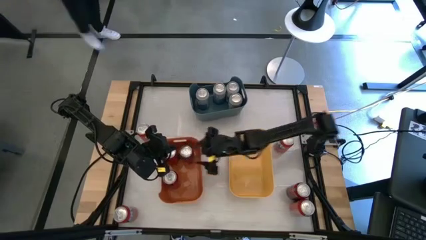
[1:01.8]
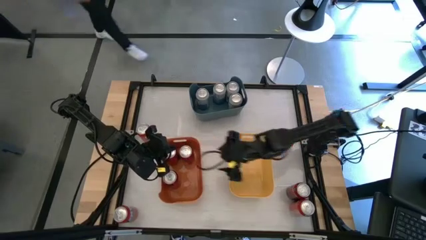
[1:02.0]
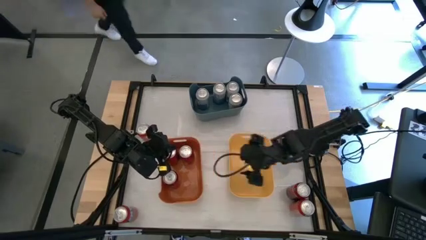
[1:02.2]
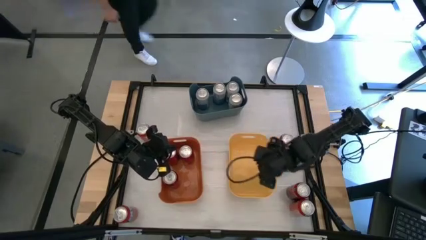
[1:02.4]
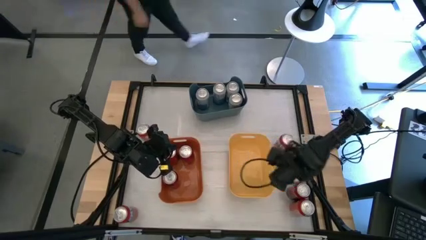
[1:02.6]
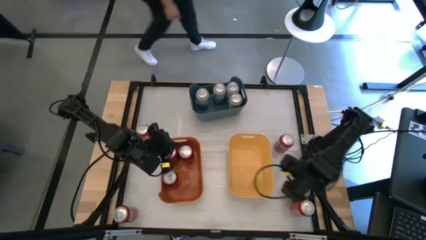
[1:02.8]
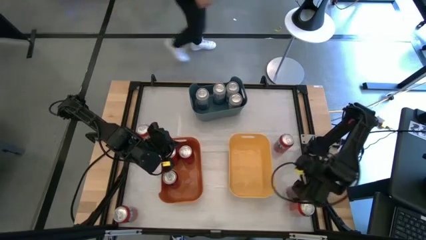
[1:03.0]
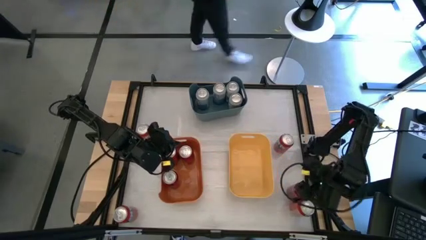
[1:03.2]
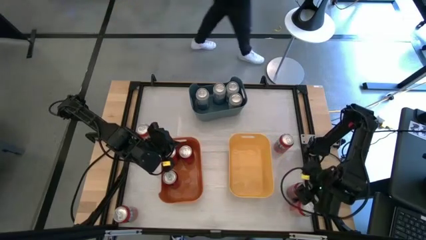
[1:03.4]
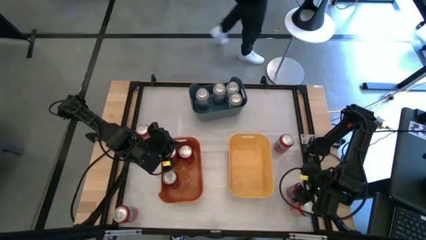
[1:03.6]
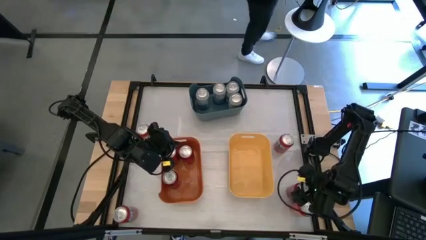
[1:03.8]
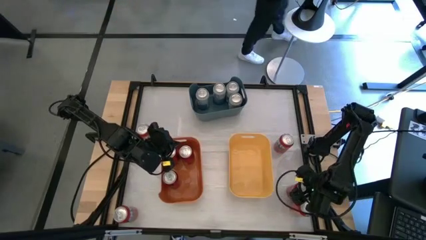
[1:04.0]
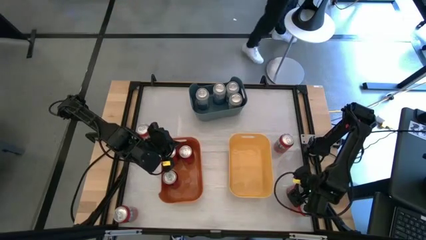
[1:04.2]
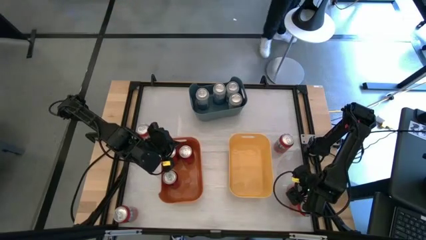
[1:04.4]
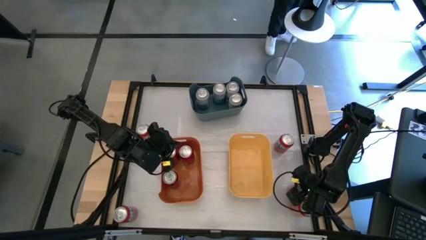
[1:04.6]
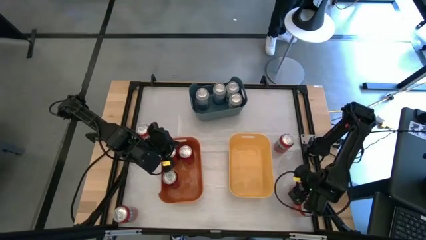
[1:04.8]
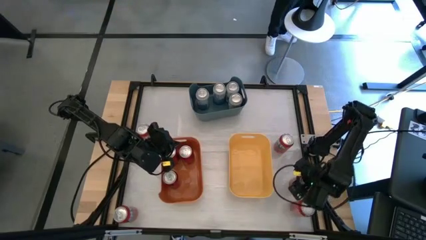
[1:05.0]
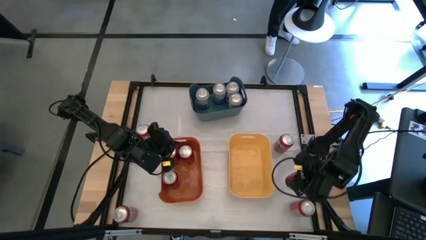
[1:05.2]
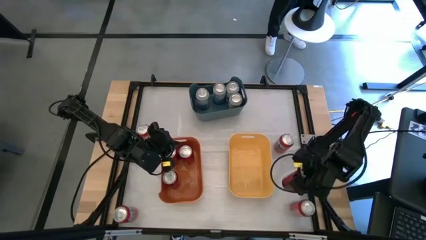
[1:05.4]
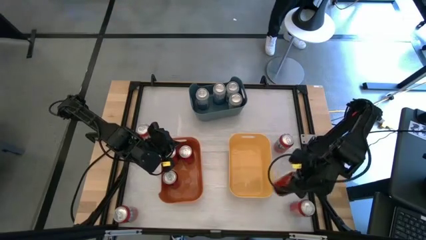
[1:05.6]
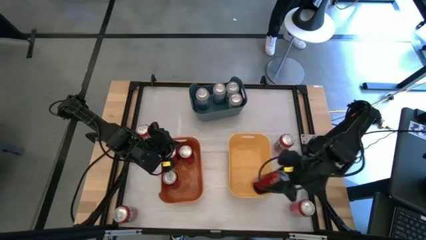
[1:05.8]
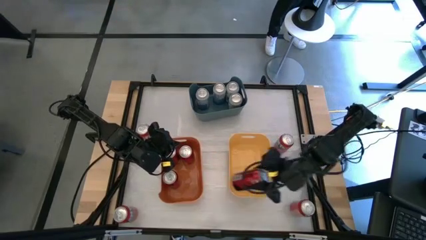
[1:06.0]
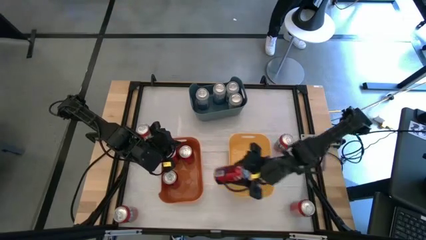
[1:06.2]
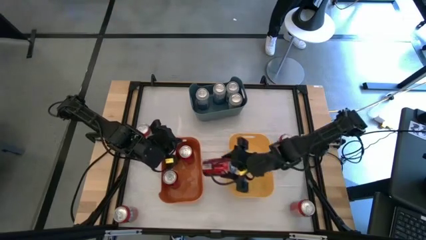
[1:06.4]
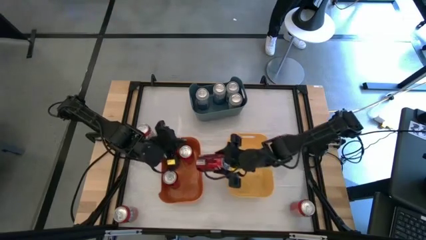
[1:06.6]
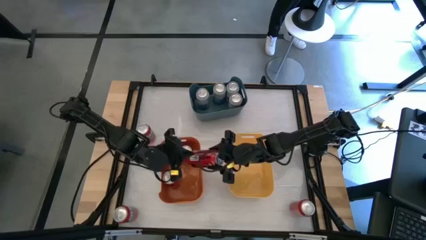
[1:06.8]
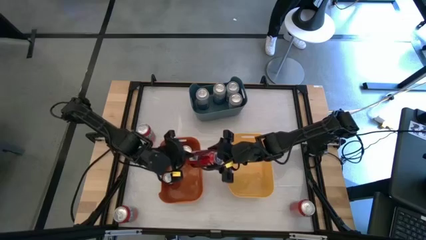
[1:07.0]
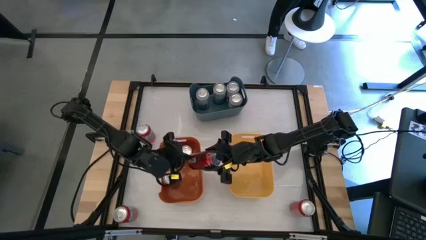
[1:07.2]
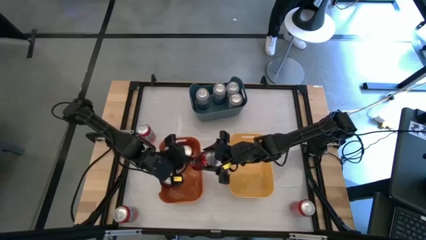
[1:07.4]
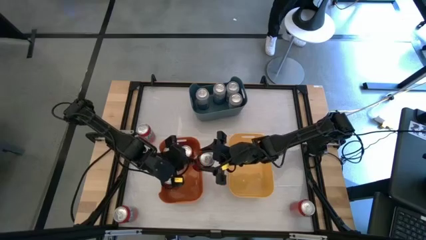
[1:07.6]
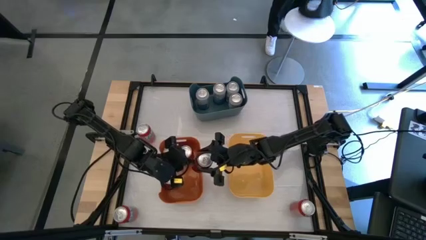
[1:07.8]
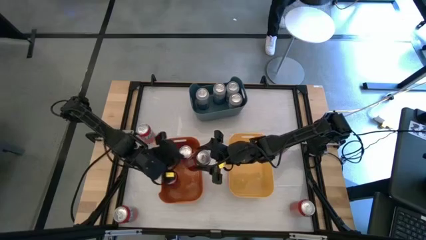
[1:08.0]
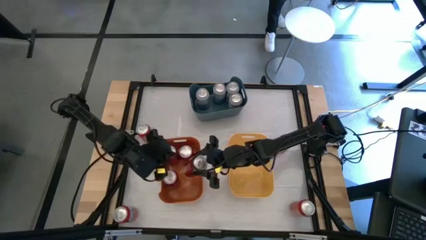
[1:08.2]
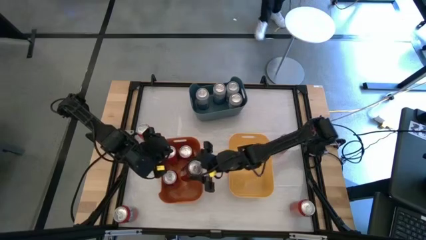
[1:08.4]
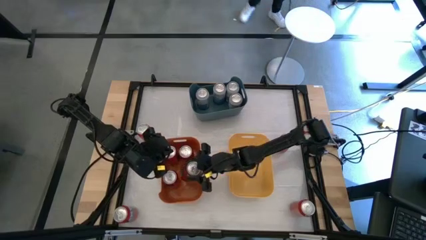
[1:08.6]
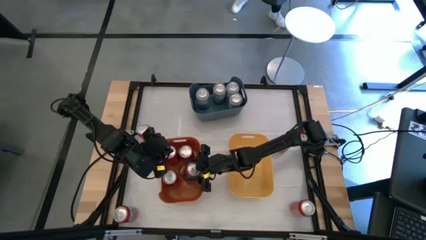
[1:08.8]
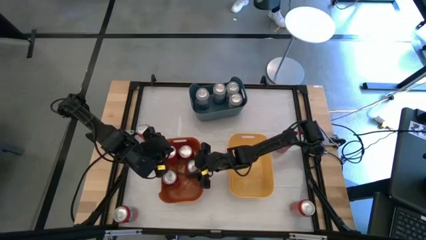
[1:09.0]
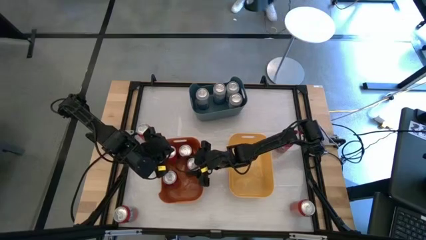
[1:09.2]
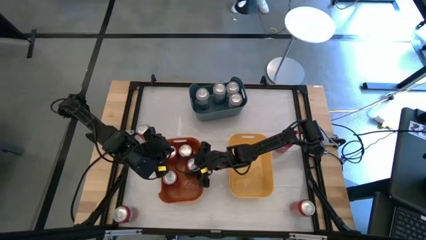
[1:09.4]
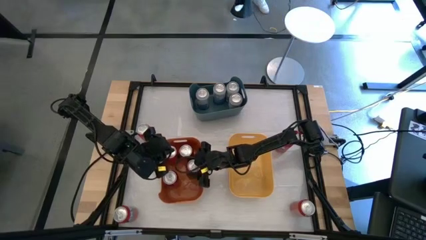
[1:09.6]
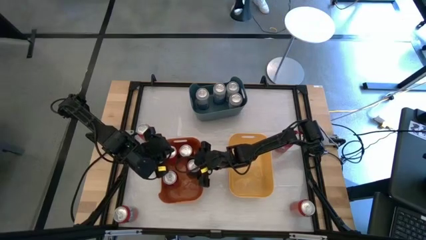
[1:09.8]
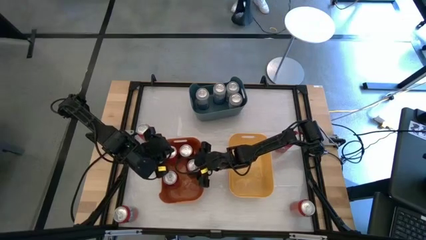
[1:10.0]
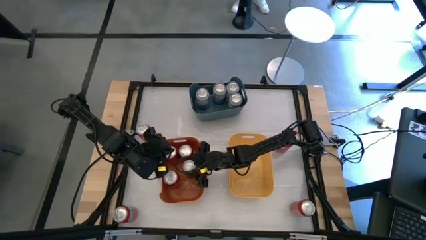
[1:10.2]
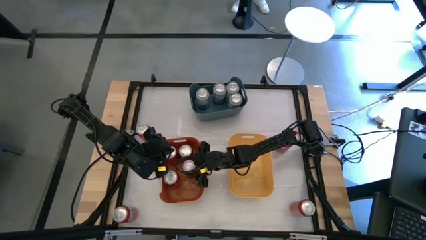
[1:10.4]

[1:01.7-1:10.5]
Task: Sort soda cans
Put the red-black soda can into the orange bin

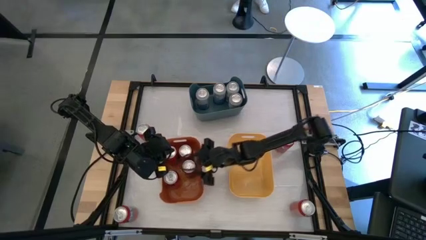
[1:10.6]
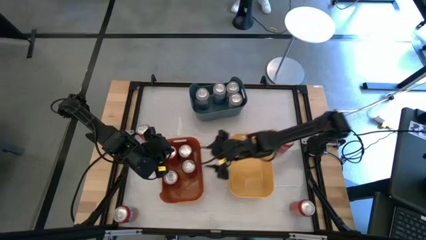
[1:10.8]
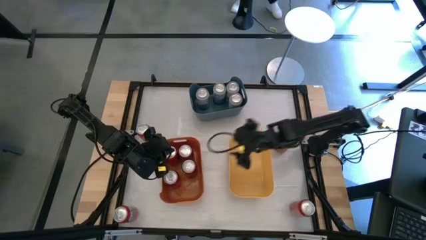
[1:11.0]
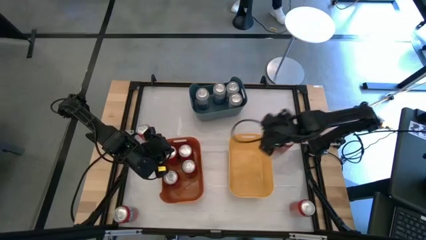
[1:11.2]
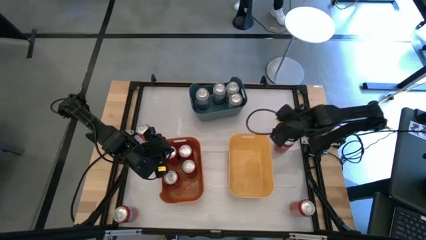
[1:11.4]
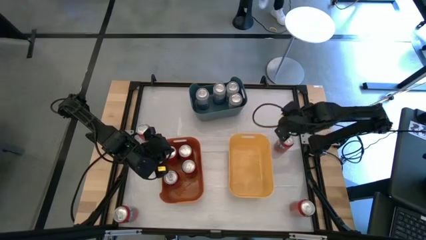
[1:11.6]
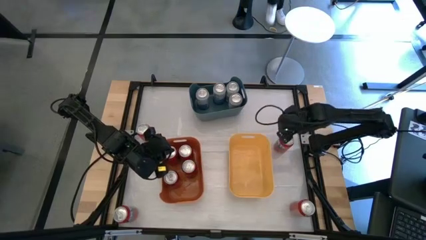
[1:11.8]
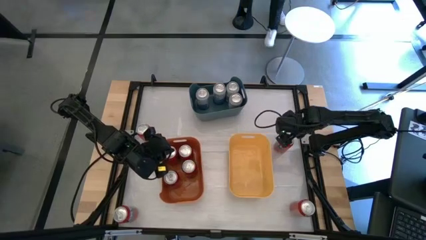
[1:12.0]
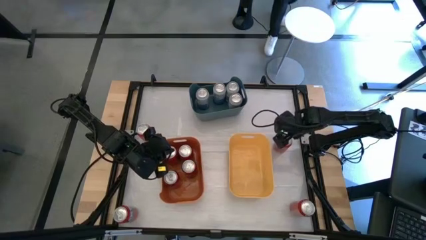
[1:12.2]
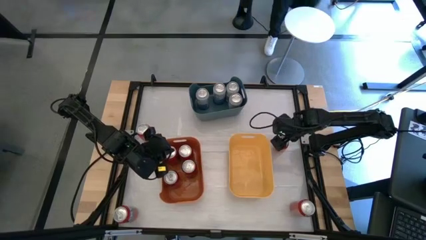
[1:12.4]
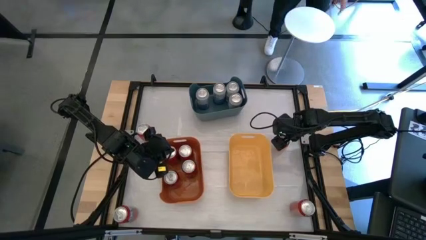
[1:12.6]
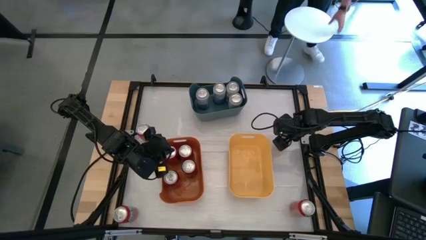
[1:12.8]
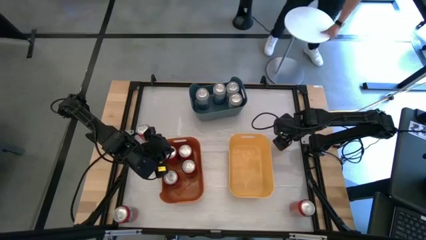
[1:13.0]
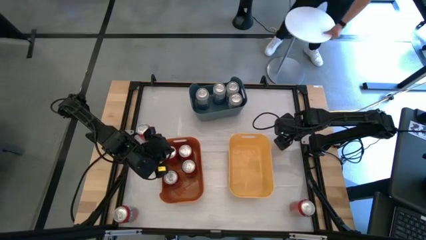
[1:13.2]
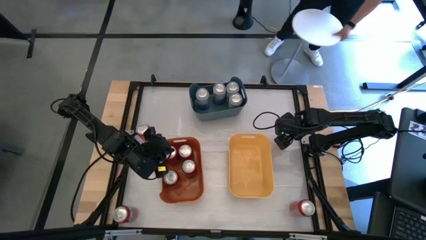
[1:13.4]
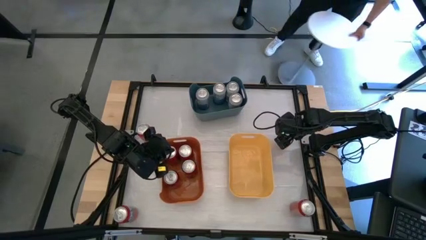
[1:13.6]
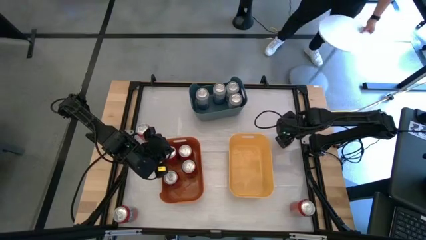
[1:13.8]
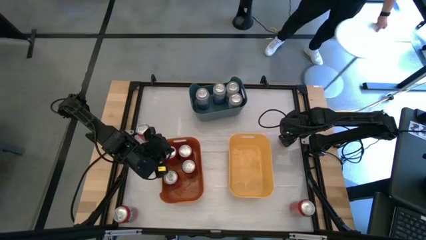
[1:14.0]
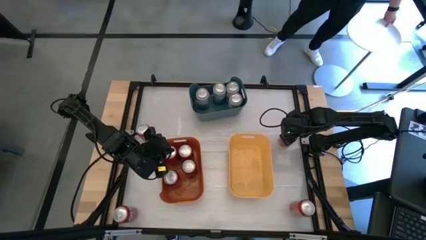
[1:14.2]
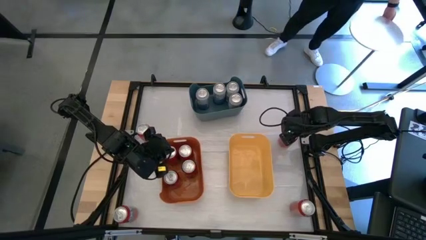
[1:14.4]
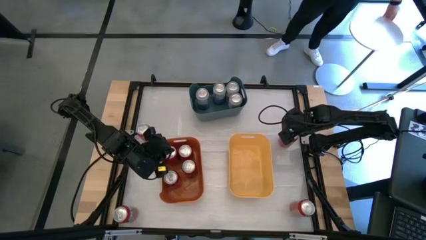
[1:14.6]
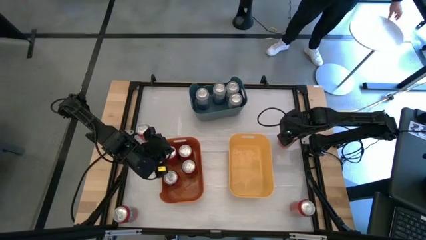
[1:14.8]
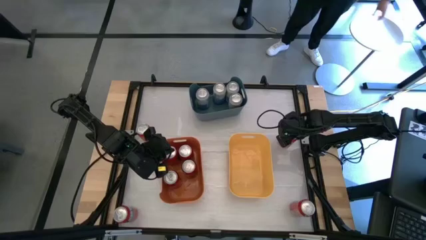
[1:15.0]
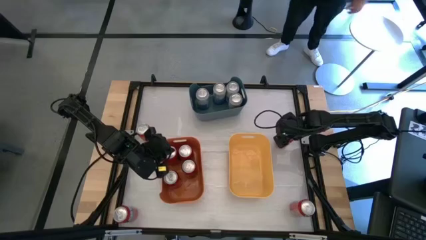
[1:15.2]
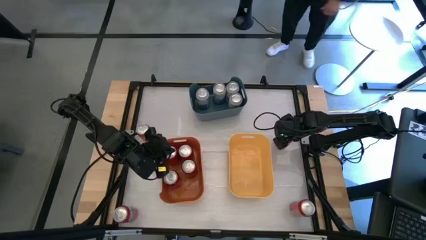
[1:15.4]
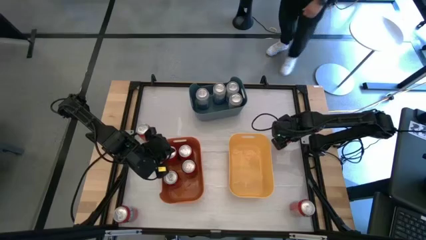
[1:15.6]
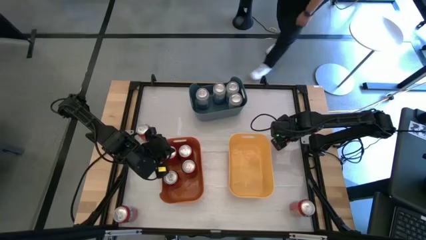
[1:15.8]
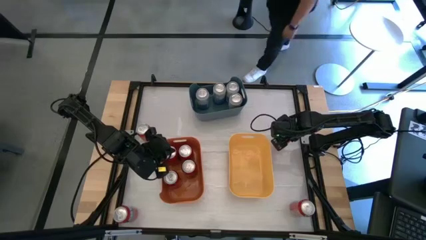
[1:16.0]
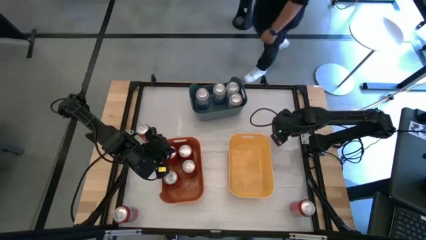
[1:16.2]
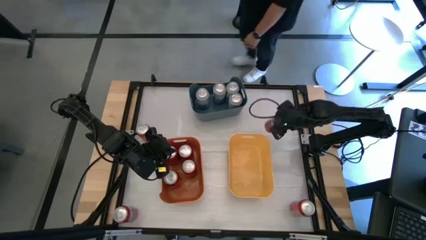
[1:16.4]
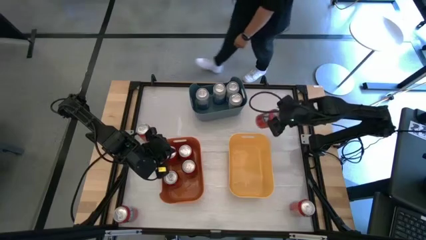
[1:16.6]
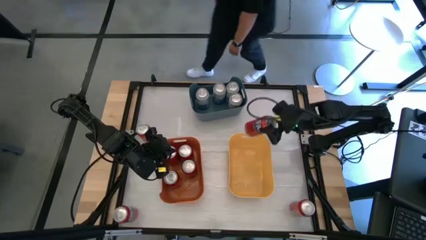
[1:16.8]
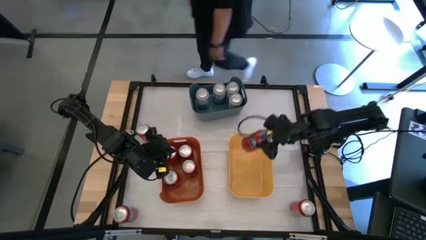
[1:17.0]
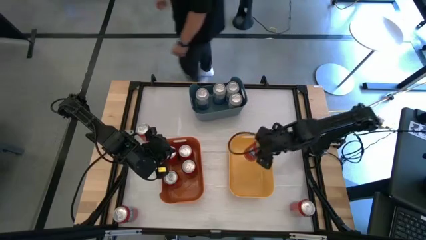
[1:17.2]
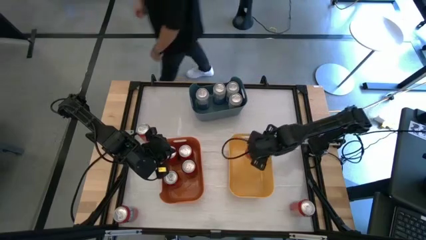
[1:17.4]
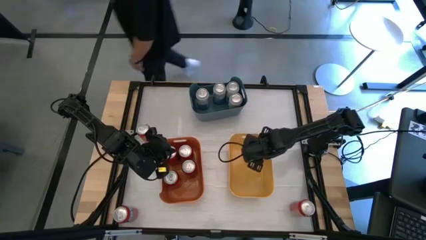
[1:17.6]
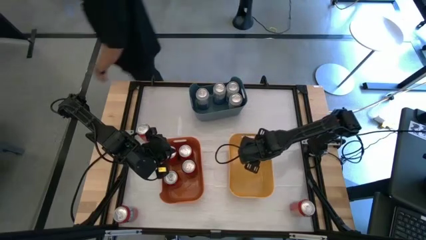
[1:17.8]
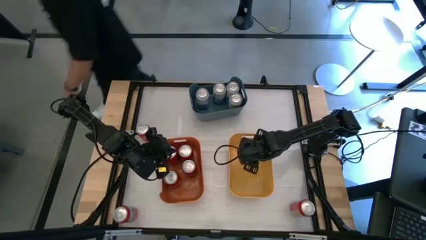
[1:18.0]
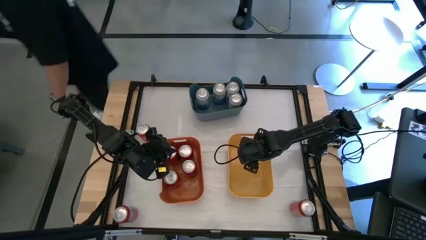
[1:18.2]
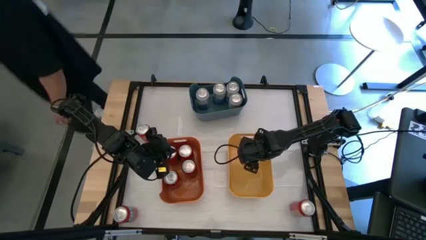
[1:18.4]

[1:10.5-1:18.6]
Put the top right red soda can into the yellow bin
